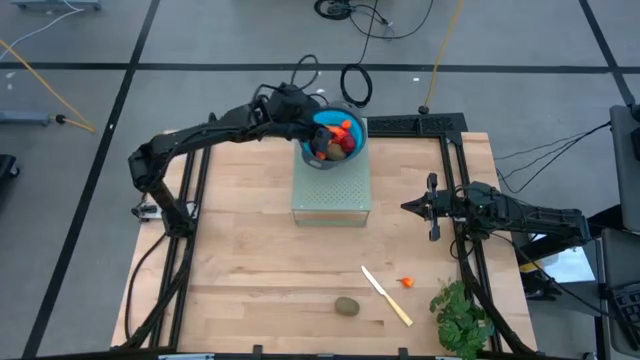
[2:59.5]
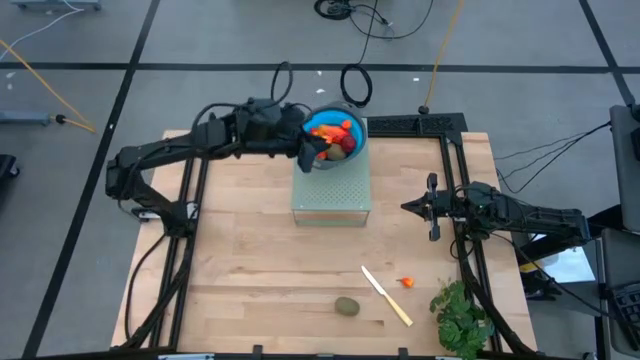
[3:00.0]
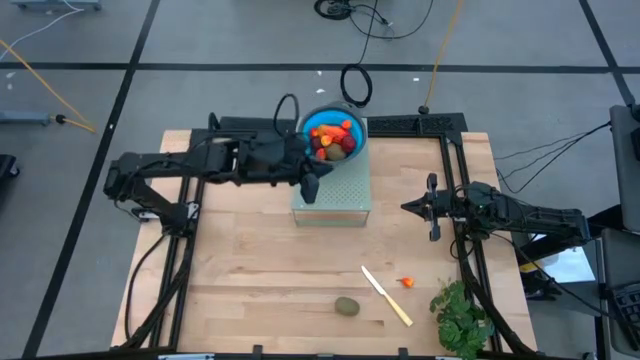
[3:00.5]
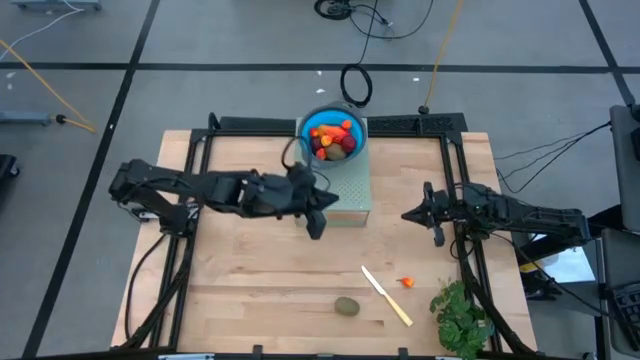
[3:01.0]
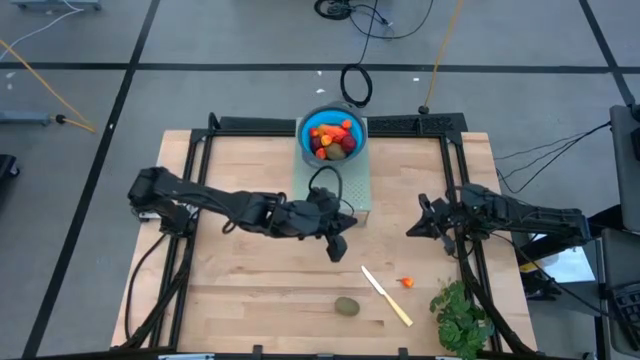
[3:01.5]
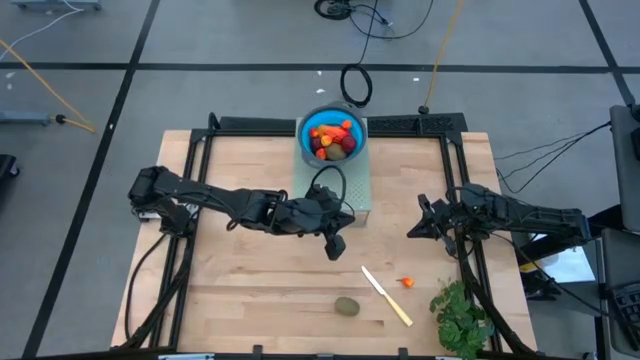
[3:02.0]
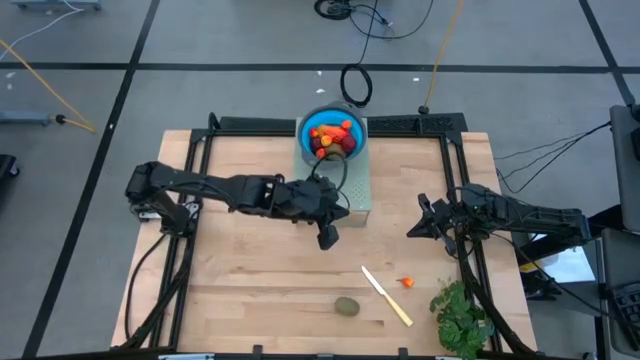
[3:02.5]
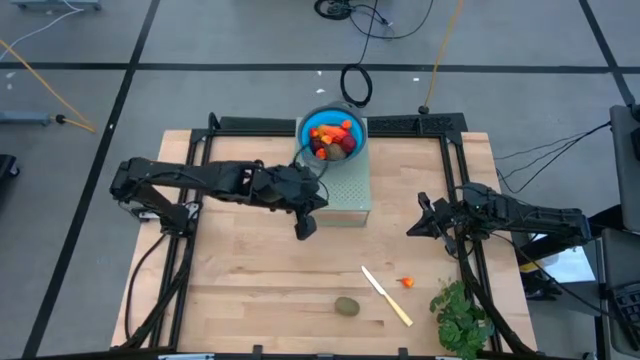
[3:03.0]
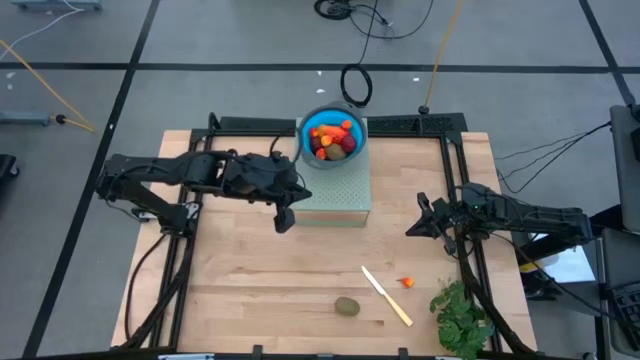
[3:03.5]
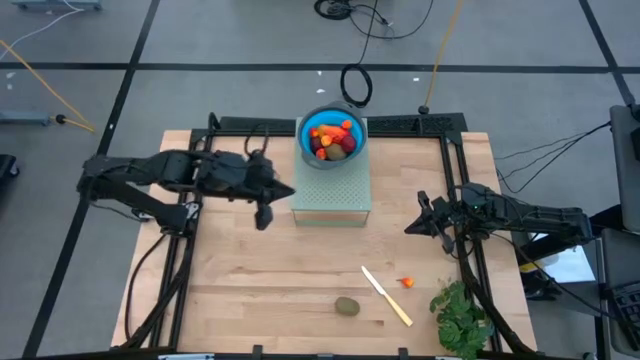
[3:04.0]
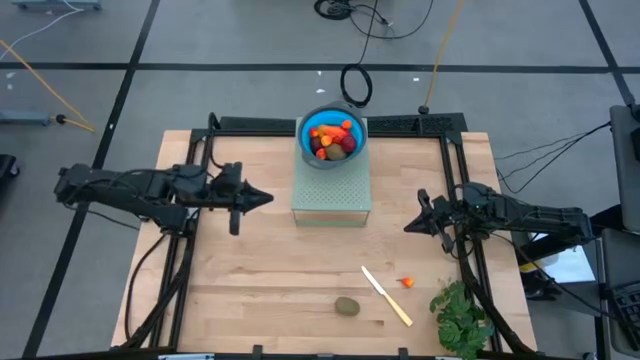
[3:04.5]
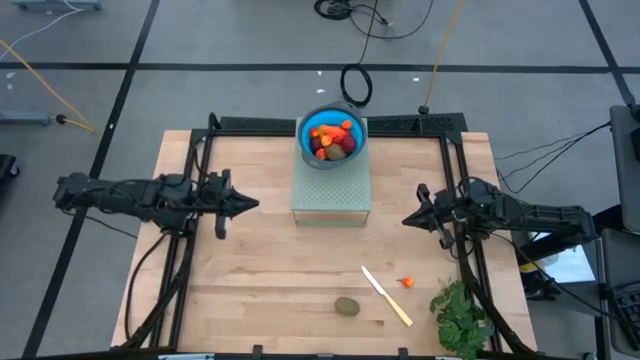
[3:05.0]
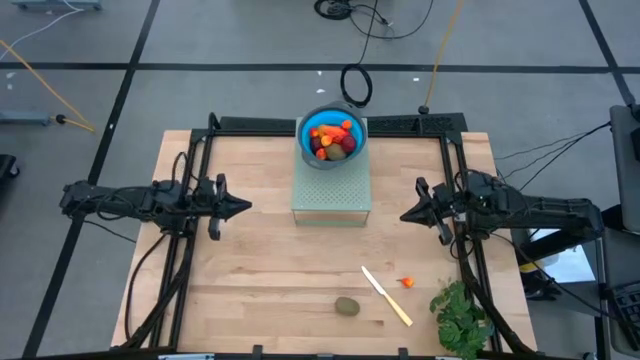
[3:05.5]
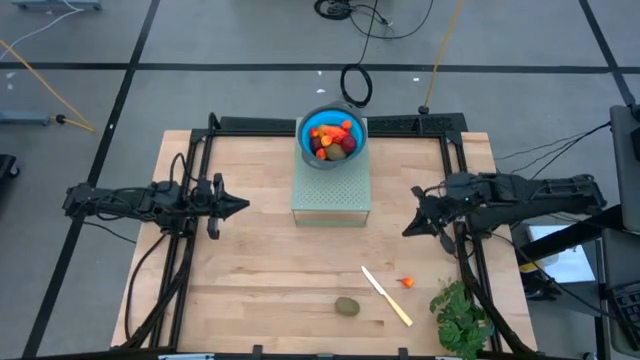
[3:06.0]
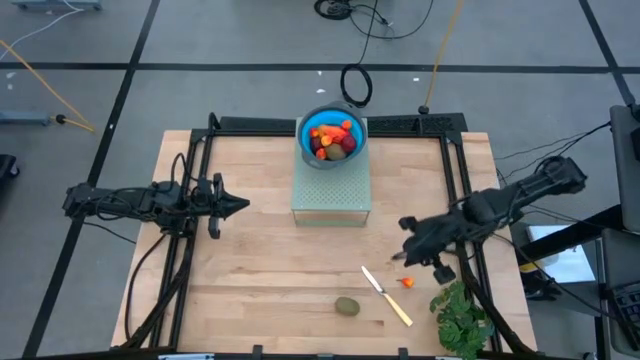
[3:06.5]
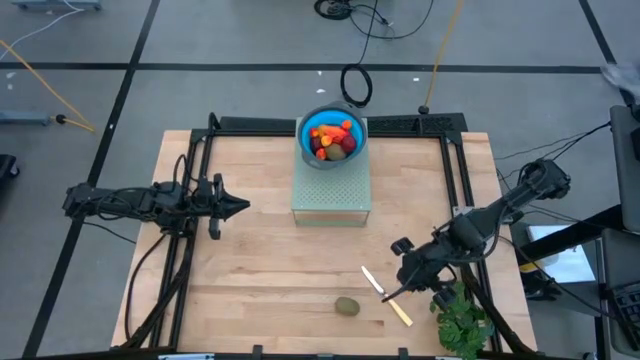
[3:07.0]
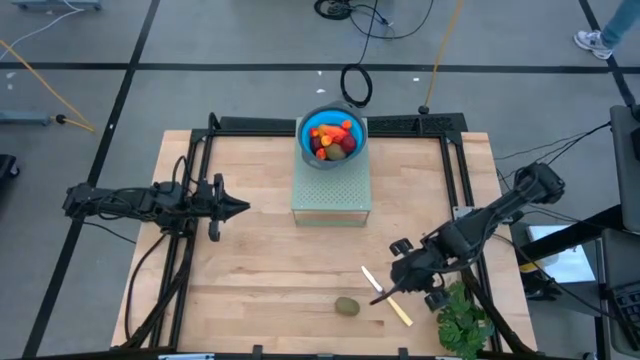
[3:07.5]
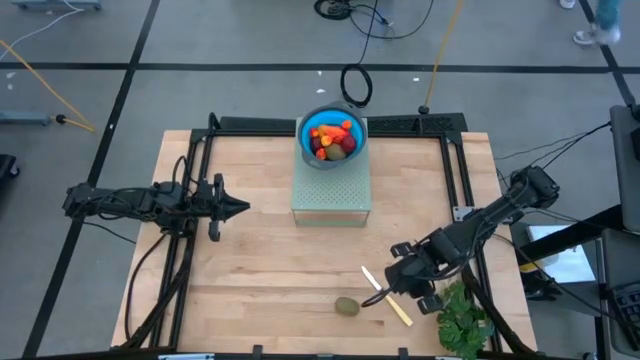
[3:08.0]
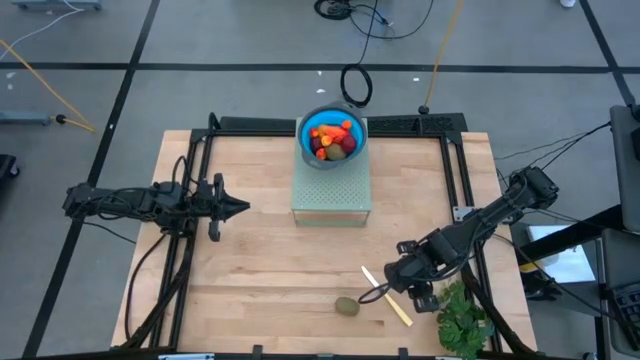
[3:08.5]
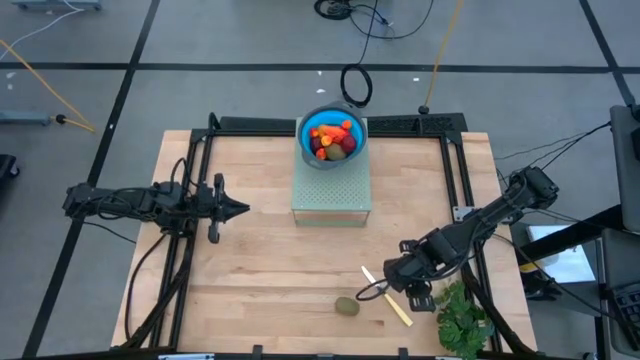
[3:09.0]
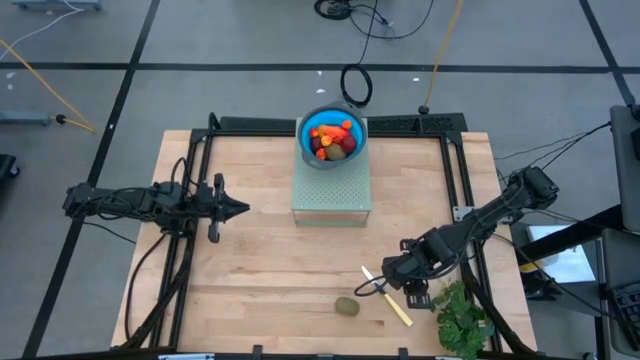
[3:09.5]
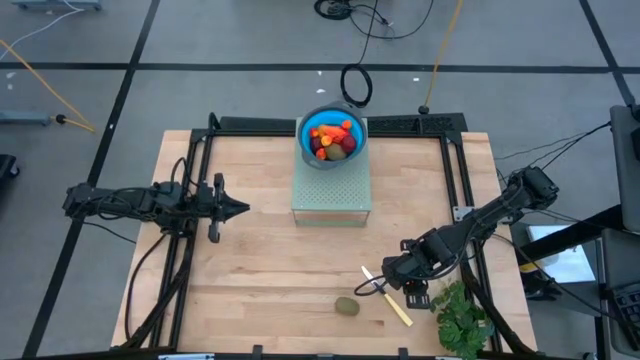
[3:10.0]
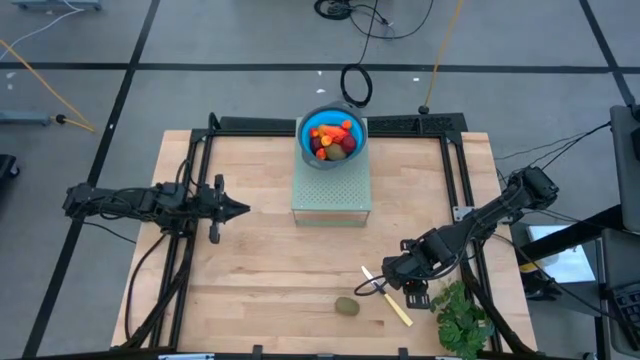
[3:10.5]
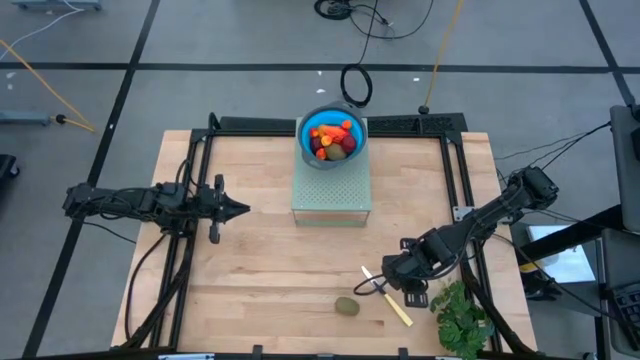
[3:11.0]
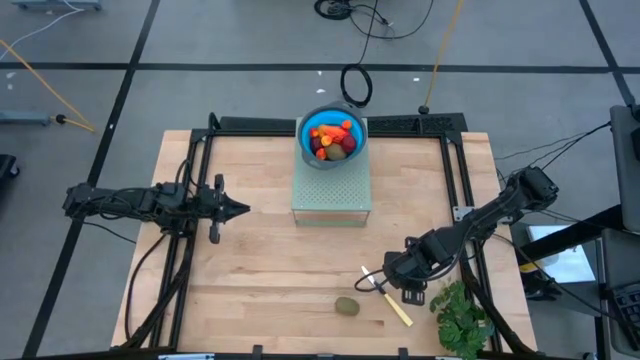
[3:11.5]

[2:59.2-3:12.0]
Task: Pick & Place Fruit
Put the peach into the blue strainer bowl on the shelf

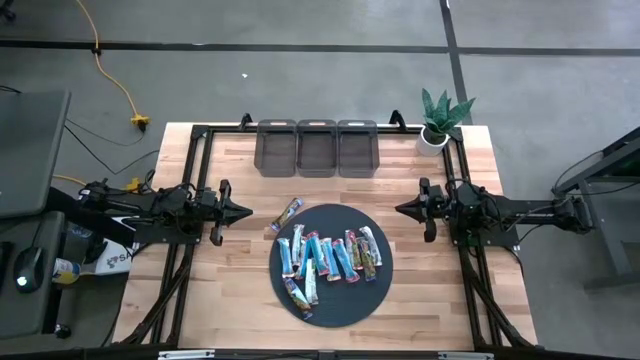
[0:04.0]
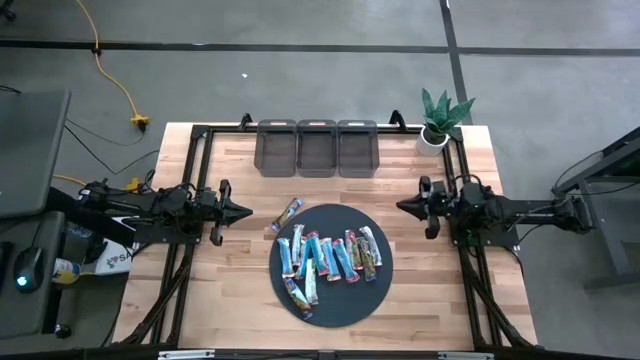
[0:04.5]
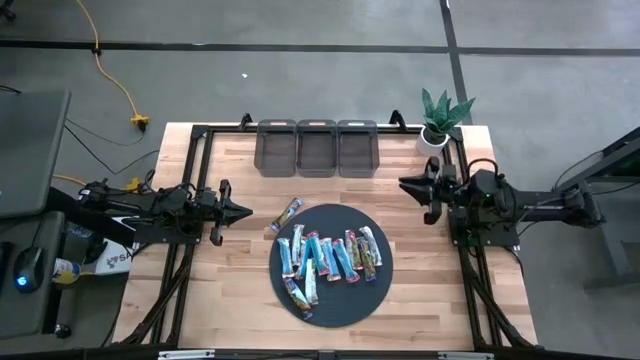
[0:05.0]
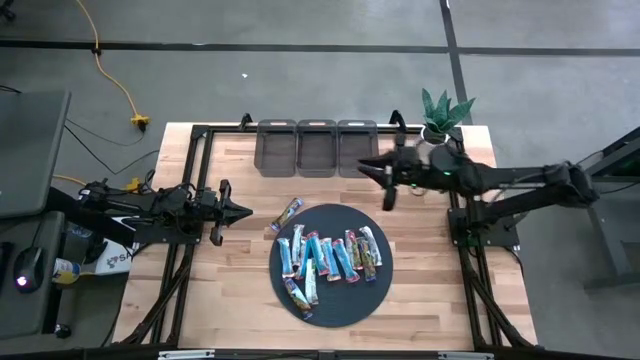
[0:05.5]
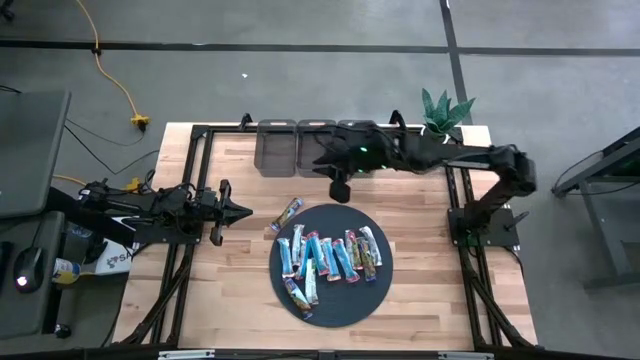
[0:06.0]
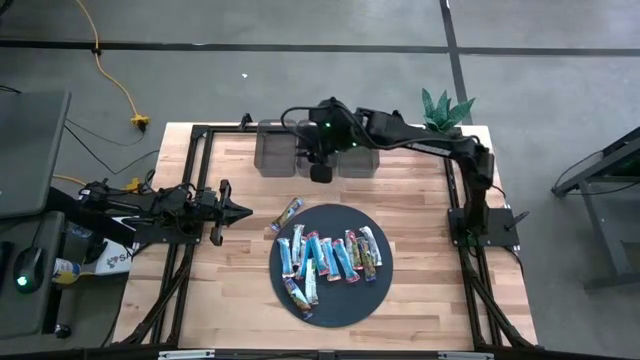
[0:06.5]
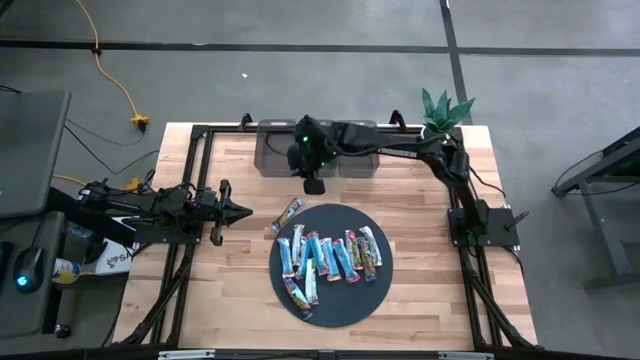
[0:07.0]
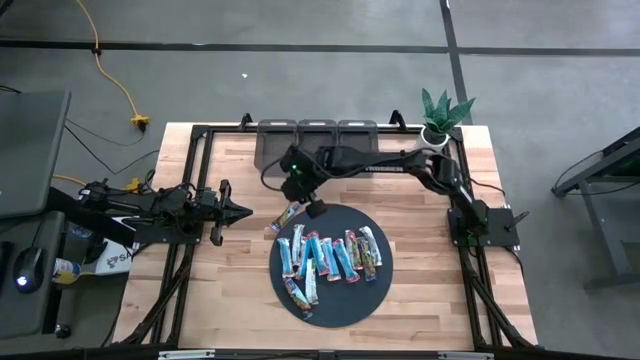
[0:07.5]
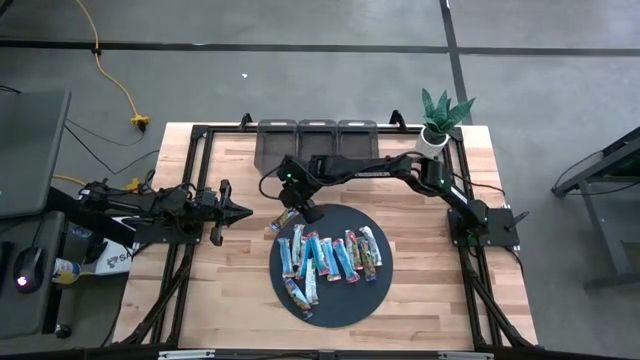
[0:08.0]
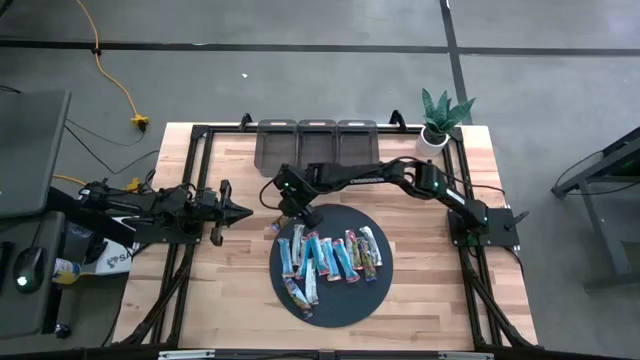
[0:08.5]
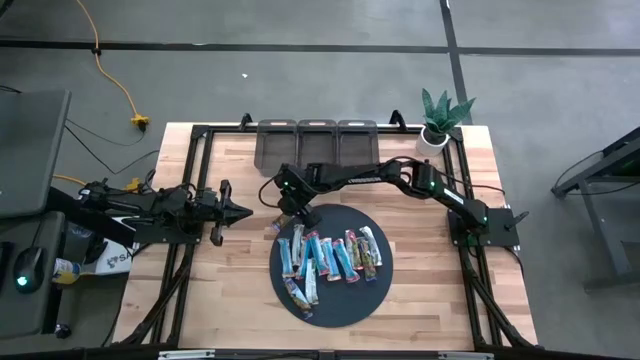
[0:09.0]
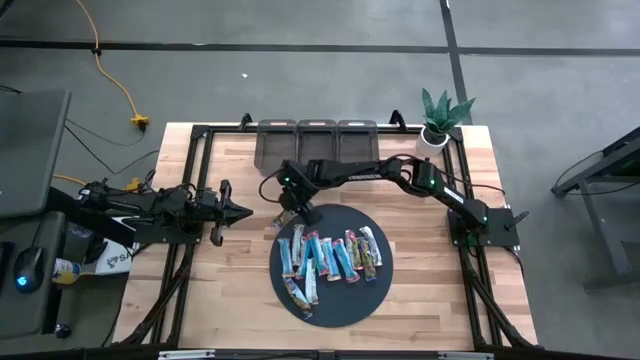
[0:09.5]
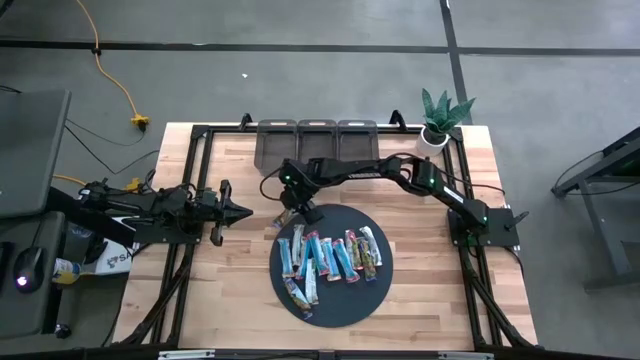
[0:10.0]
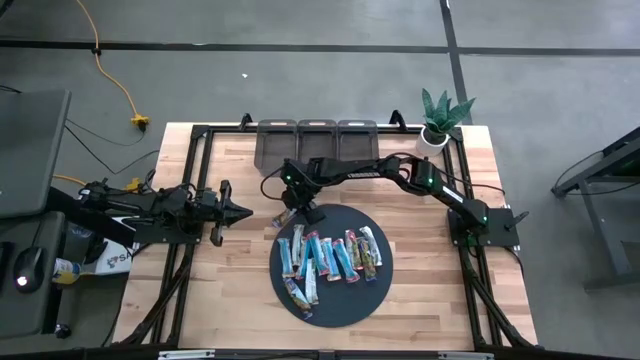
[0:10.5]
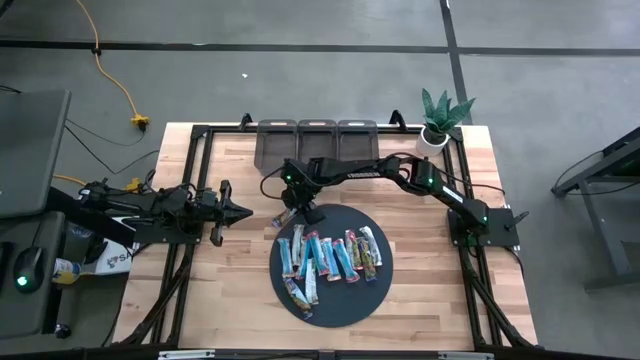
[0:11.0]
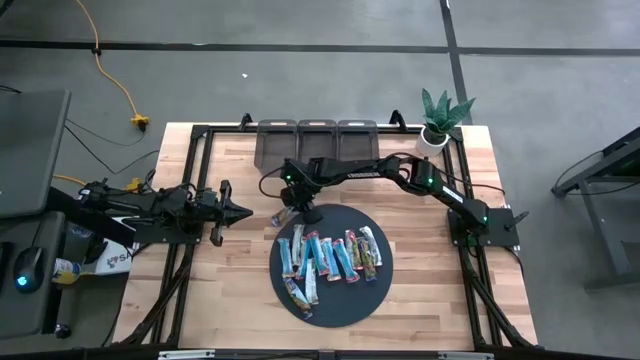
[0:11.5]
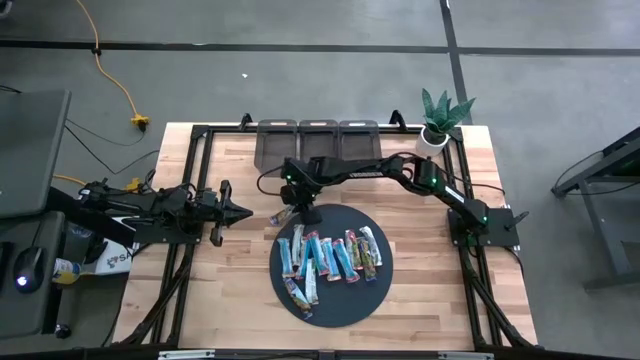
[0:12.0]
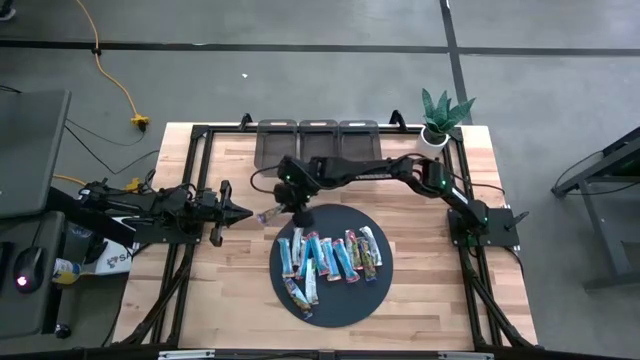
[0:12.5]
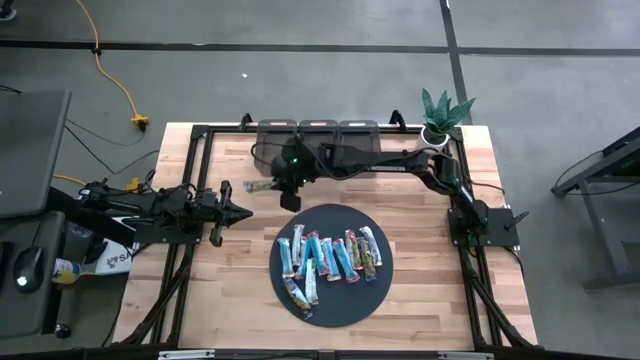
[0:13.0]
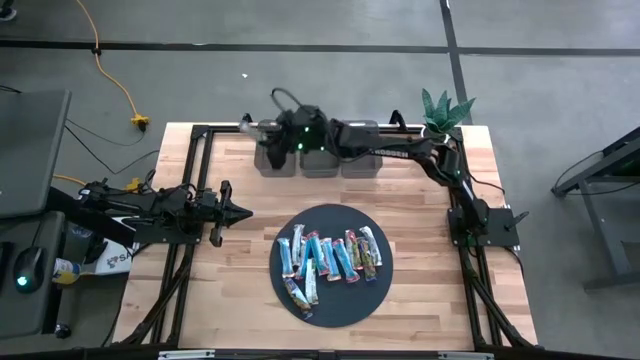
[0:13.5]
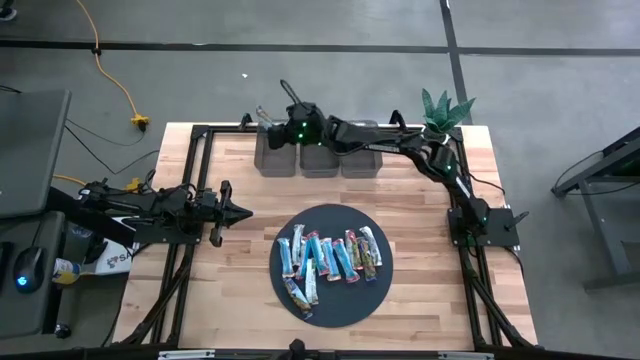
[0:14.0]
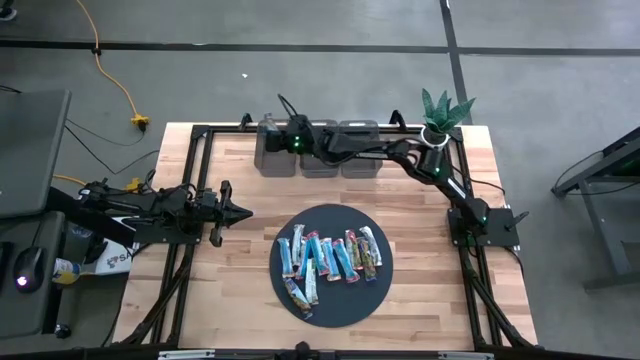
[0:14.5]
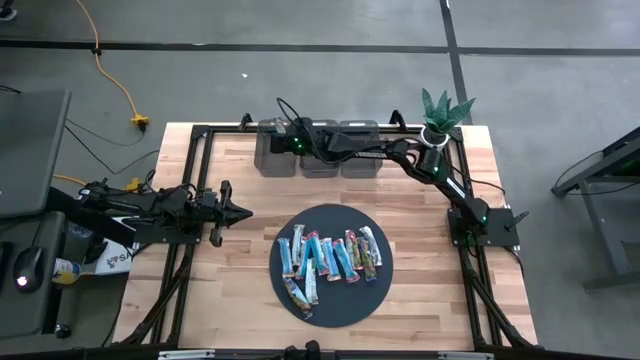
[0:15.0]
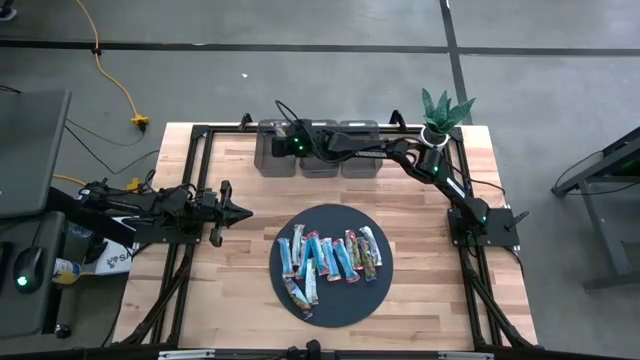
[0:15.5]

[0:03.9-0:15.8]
Task: Pick and place Granola Bars by type
Put the blue granola bar into the left black bin
